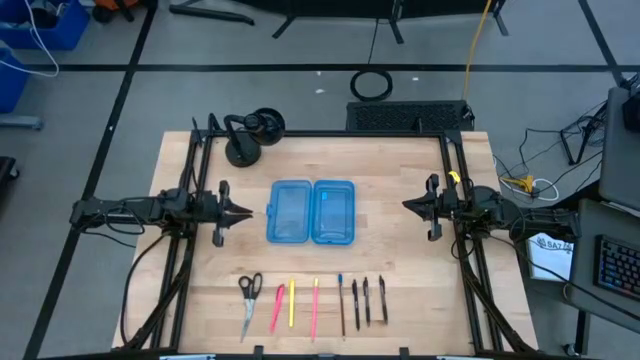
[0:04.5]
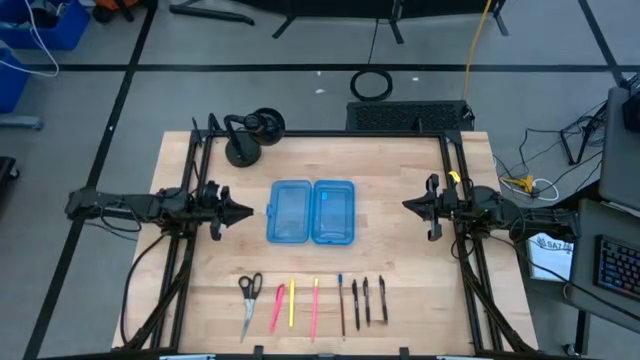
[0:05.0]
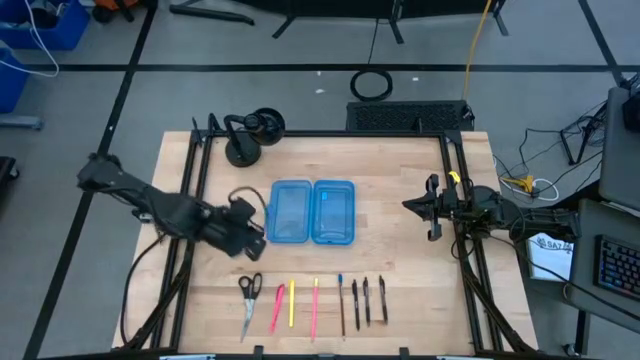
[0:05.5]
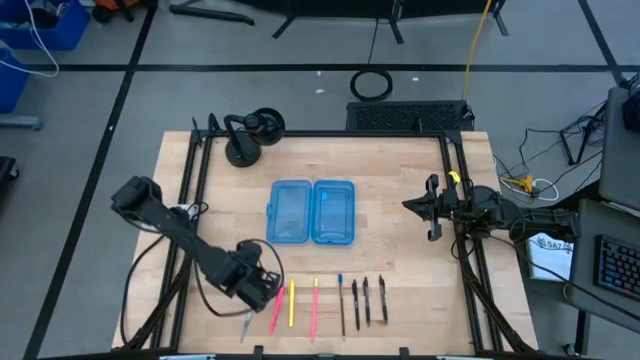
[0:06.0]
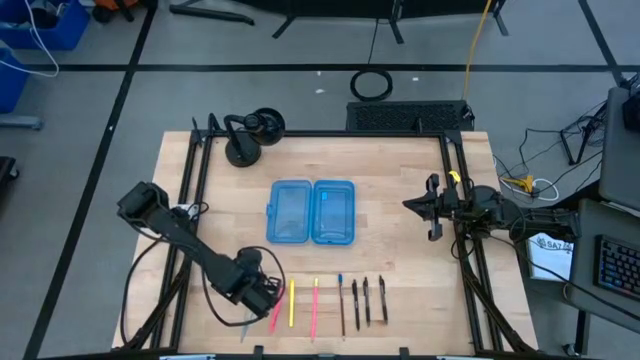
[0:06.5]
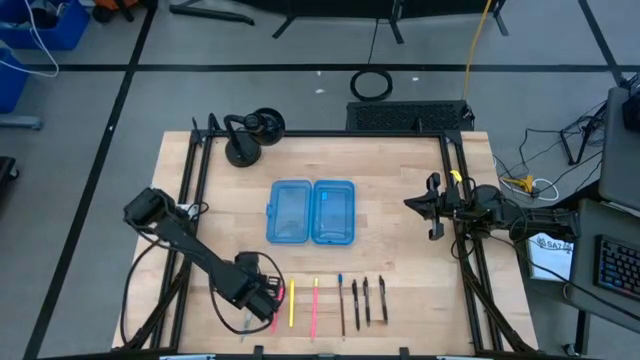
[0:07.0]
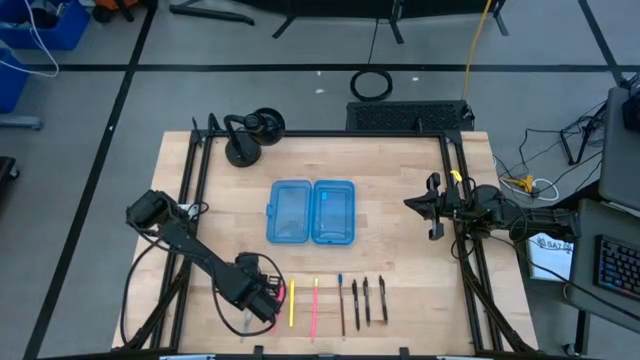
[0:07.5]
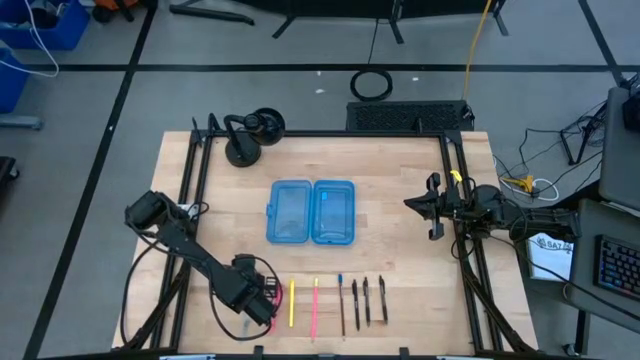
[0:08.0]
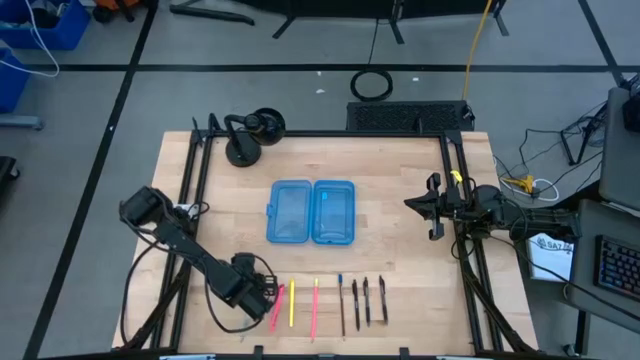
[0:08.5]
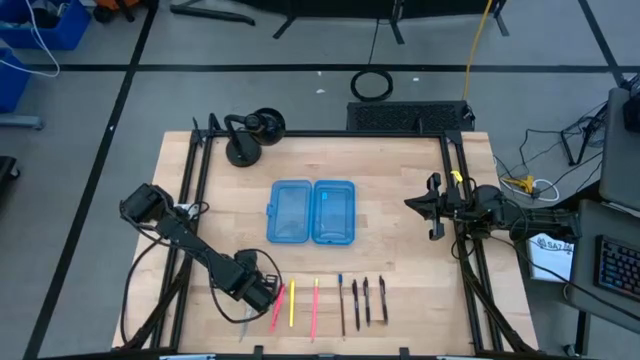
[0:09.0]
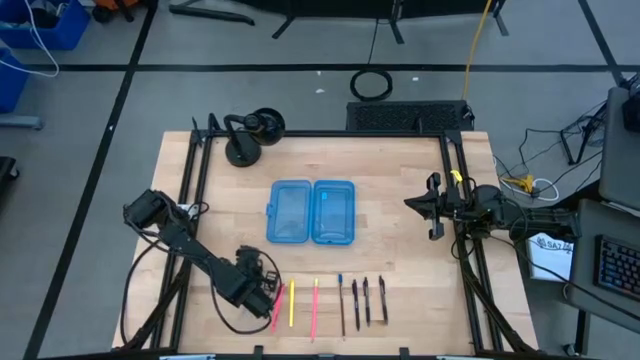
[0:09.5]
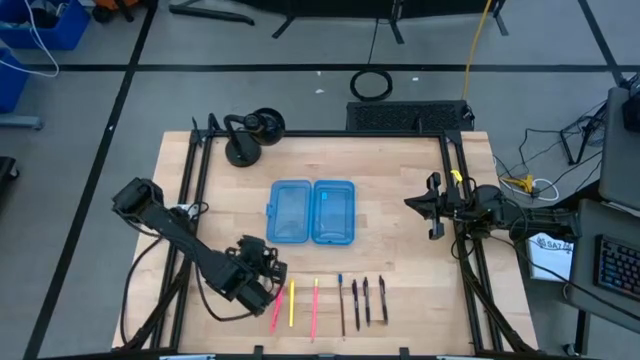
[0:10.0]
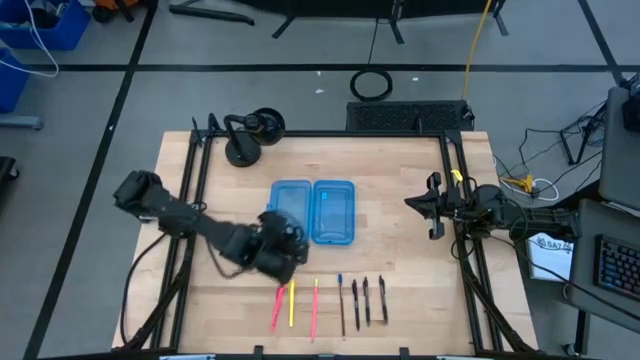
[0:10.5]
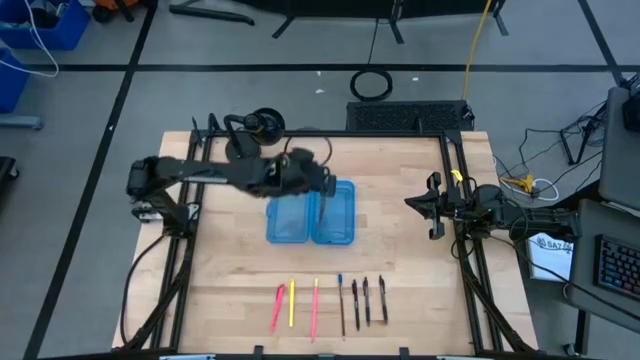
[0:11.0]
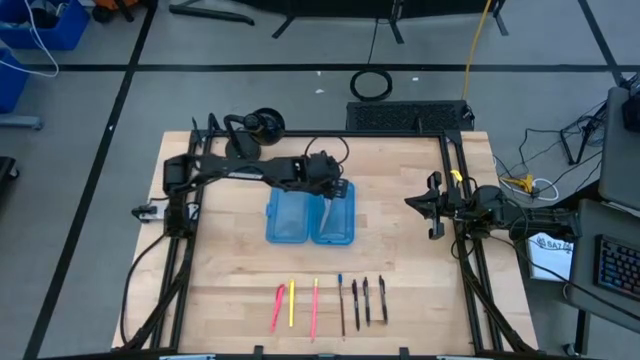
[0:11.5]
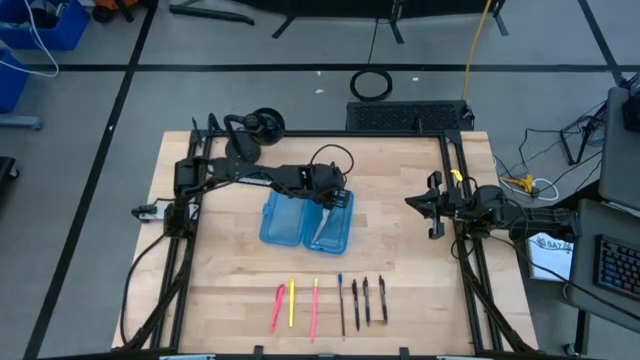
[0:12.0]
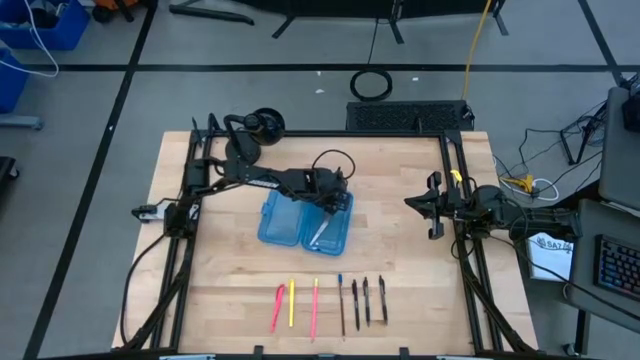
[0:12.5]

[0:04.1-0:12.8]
Task: Pick & place school supplies into a supply box
Put the black scissors into the blue supply box

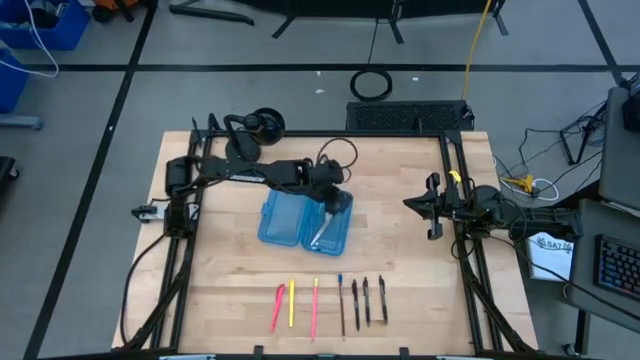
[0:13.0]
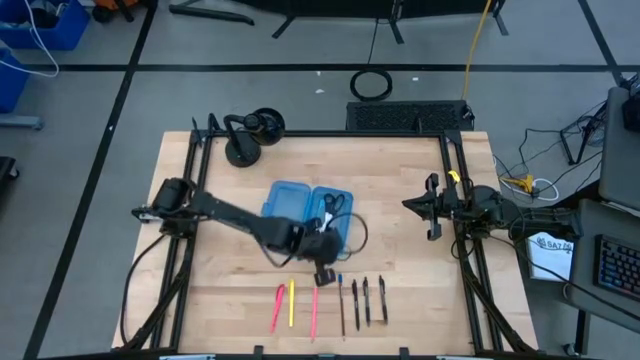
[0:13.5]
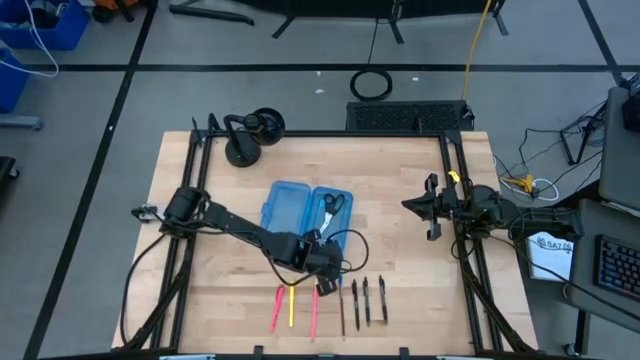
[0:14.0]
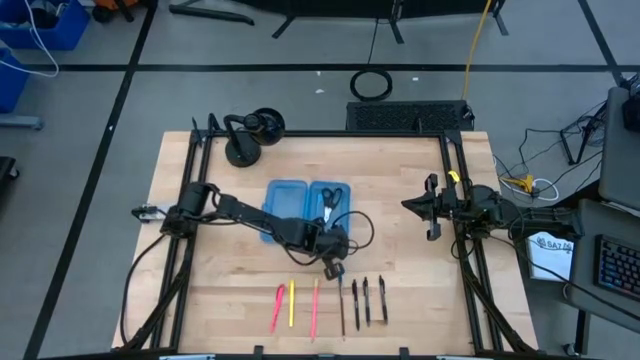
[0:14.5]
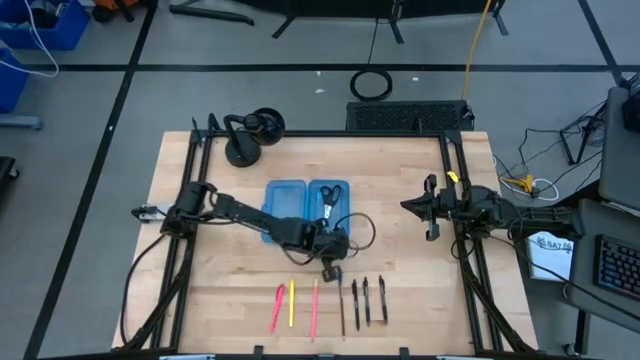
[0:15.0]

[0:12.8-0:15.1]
Adjust the blue supply box

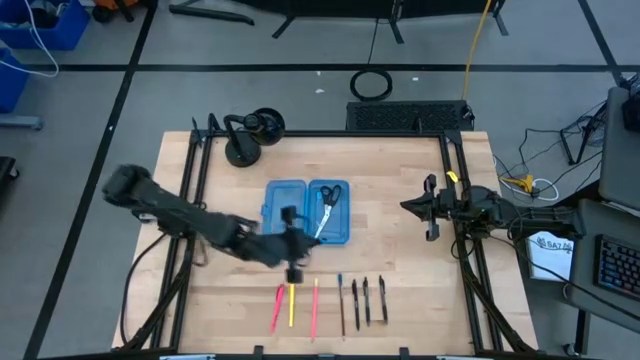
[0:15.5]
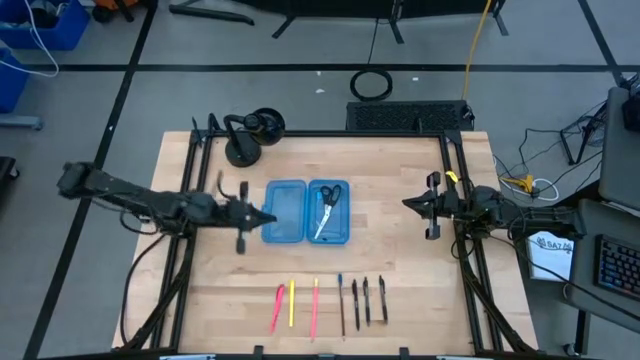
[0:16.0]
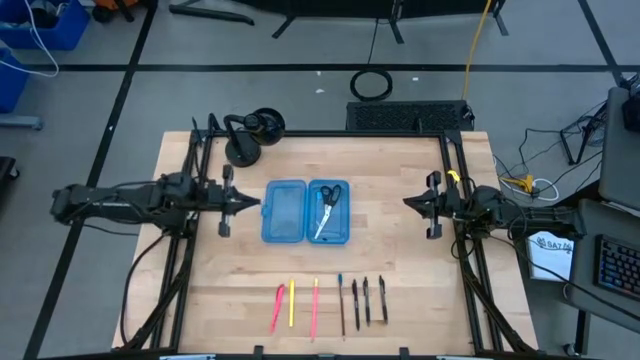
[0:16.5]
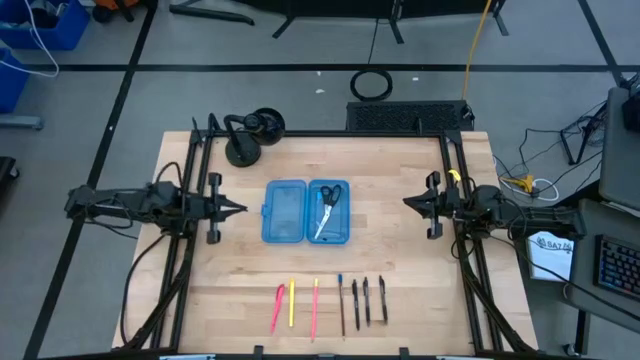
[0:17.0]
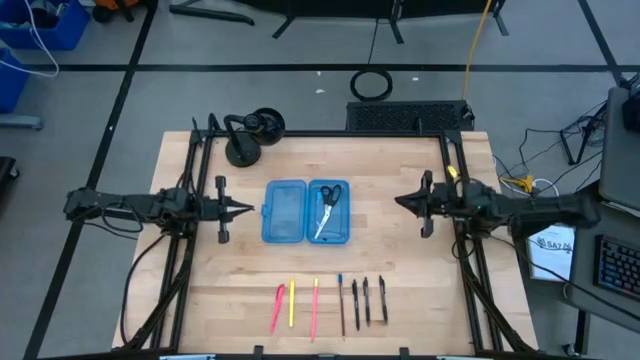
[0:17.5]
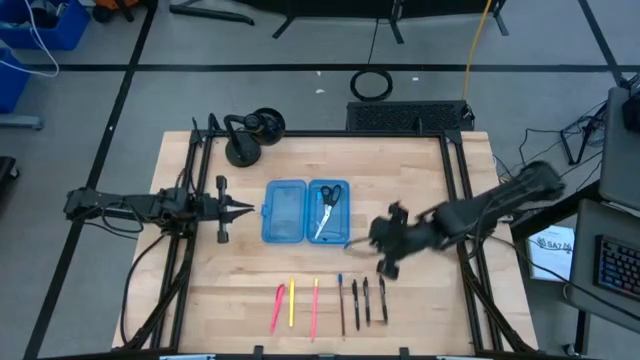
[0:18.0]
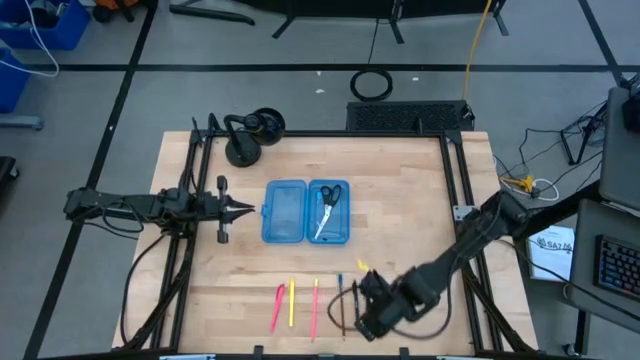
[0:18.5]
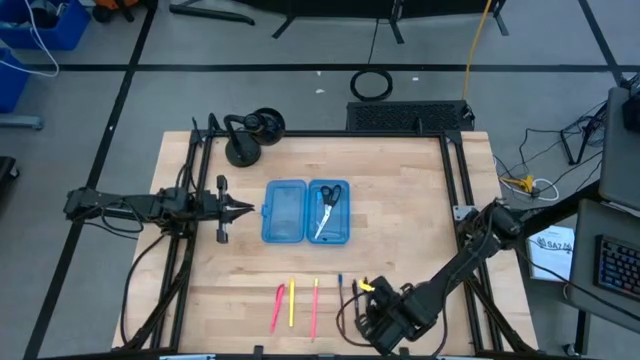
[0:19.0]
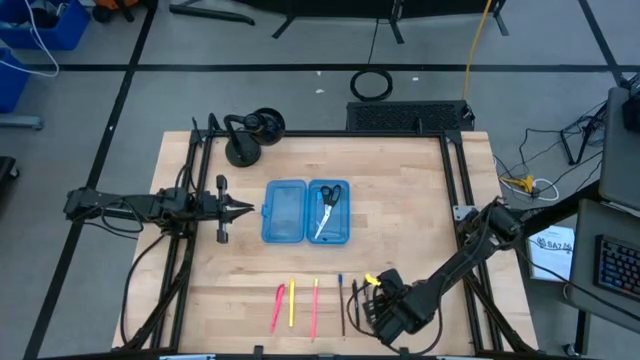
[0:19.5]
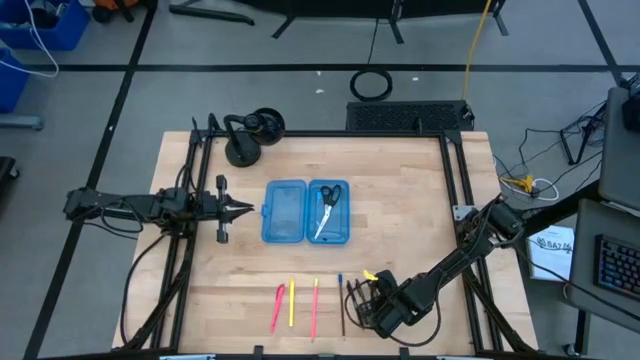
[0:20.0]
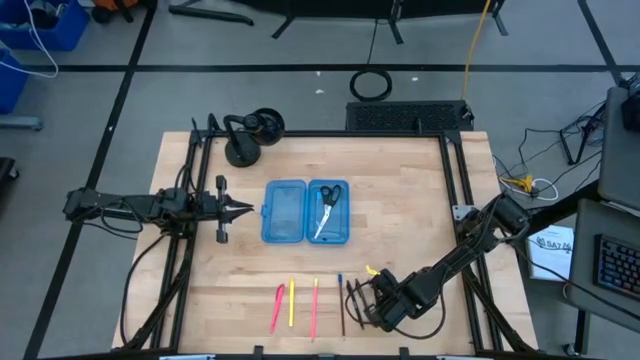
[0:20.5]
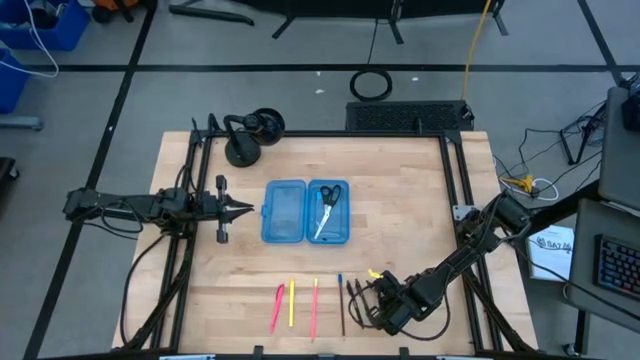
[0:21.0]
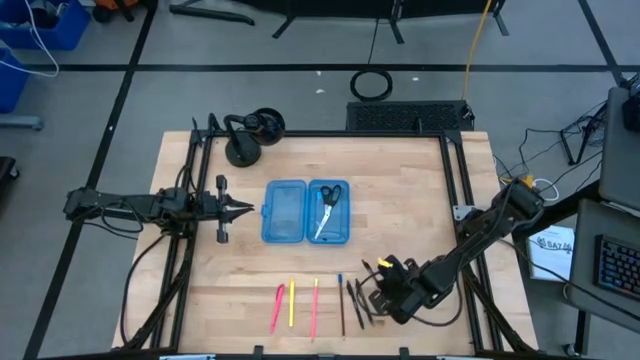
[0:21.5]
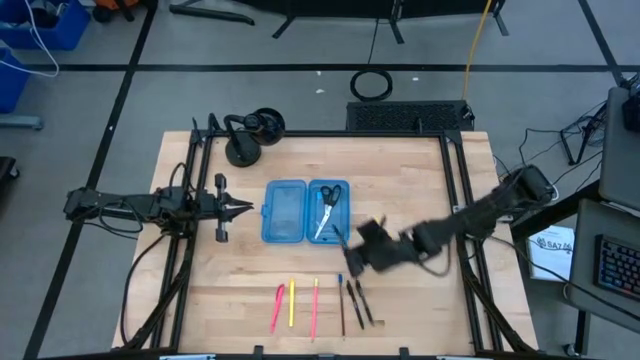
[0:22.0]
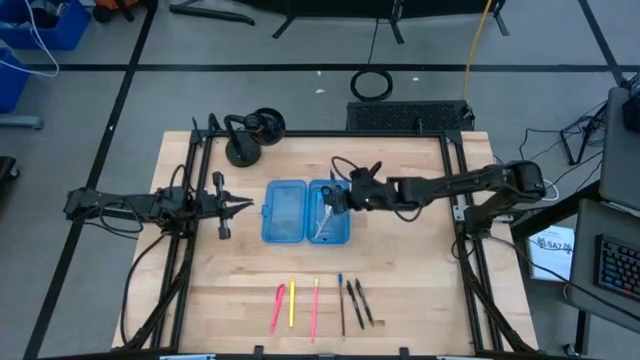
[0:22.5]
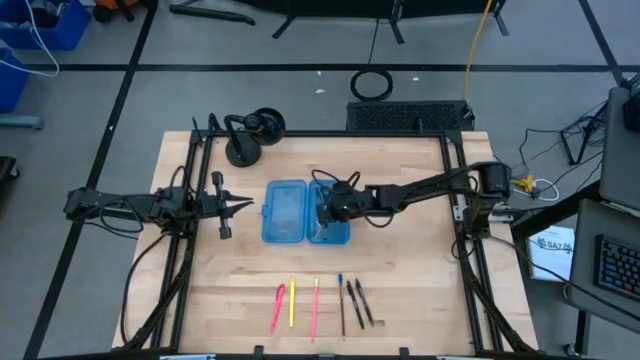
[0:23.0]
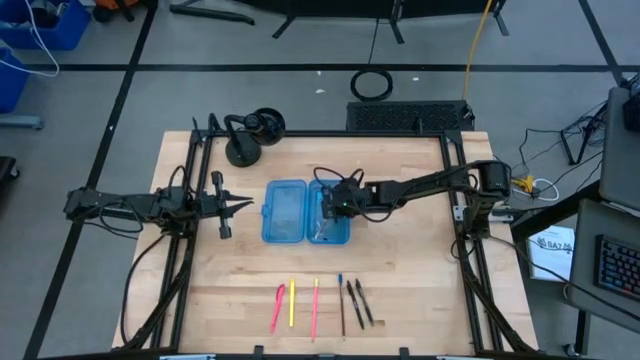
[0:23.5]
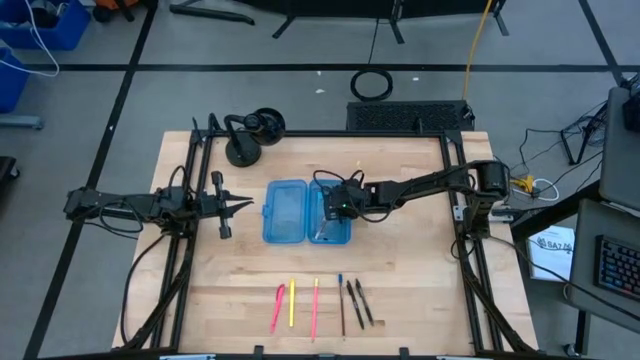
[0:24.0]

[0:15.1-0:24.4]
Put the right black transparent pen into the blue supply box

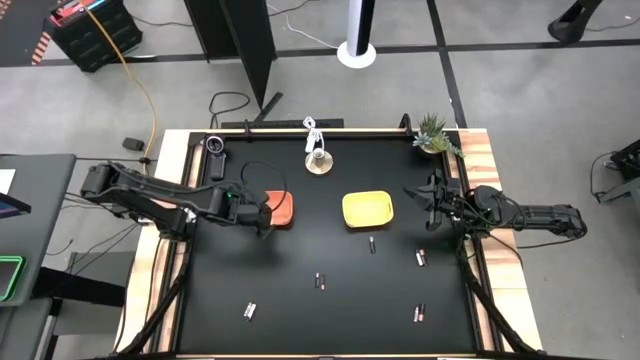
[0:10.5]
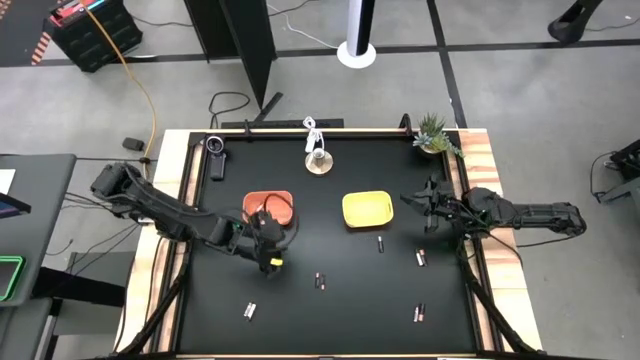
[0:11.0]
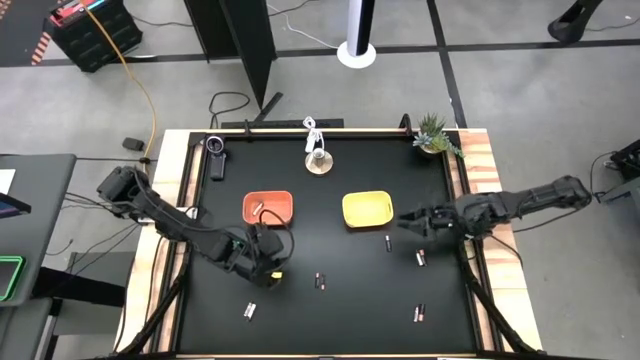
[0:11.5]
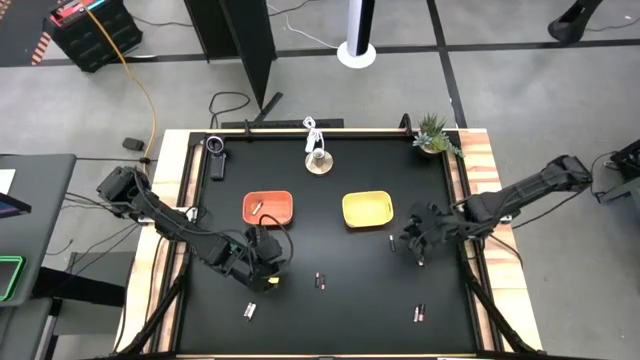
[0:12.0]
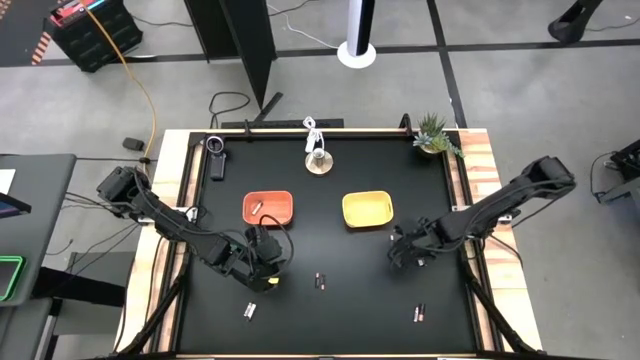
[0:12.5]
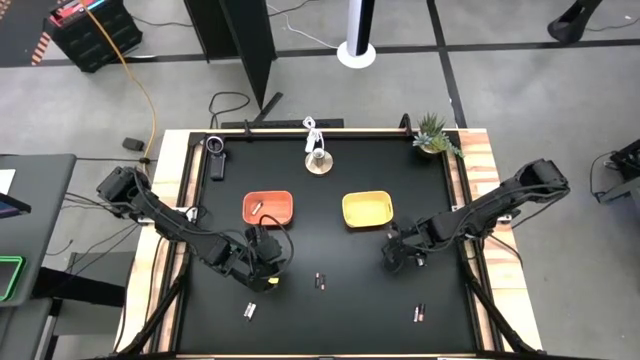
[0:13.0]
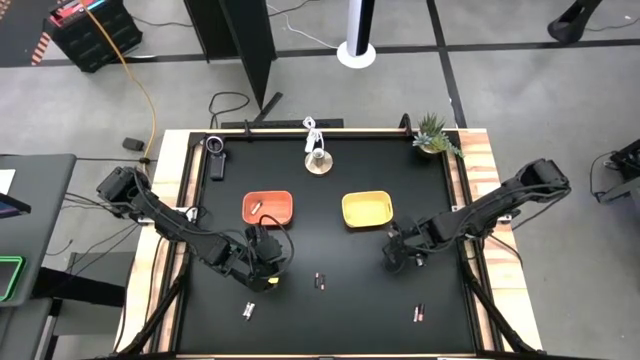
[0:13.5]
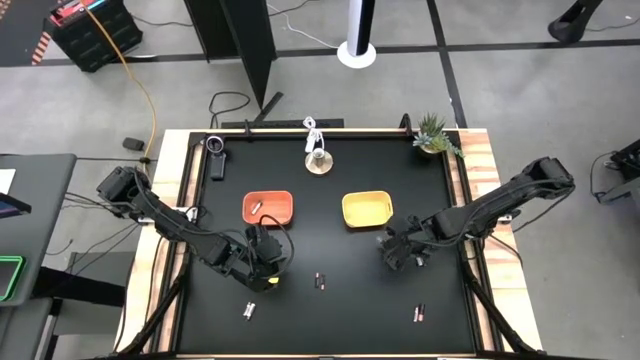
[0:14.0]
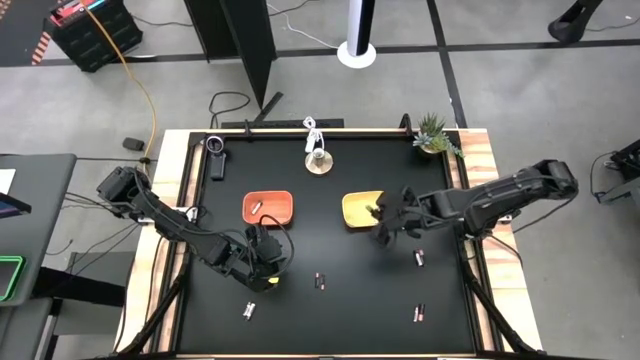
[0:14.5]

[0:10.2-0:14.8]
Task: Sort batteries
Put the black battery into the yellow bin
